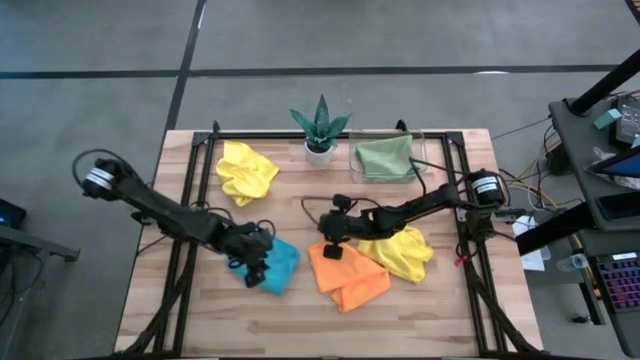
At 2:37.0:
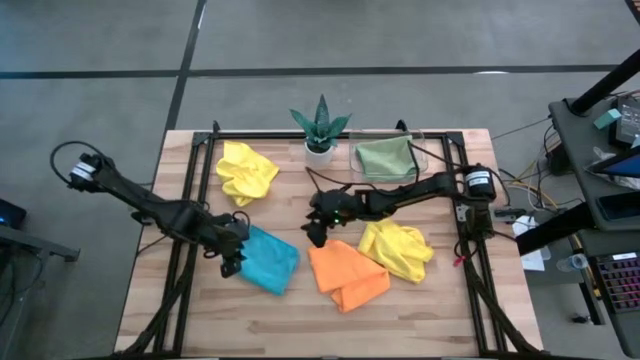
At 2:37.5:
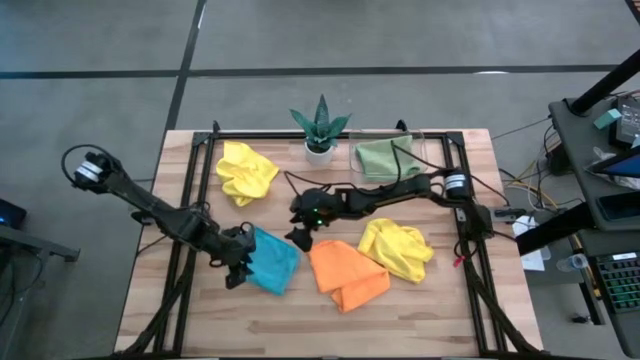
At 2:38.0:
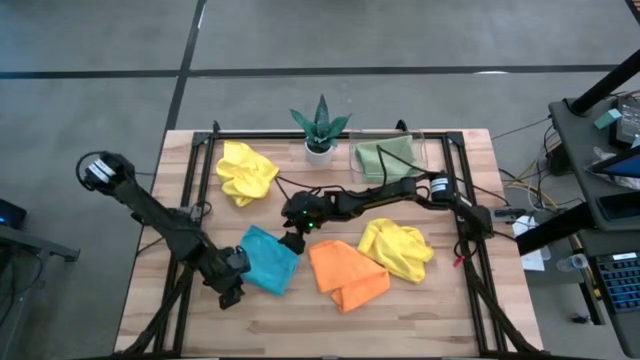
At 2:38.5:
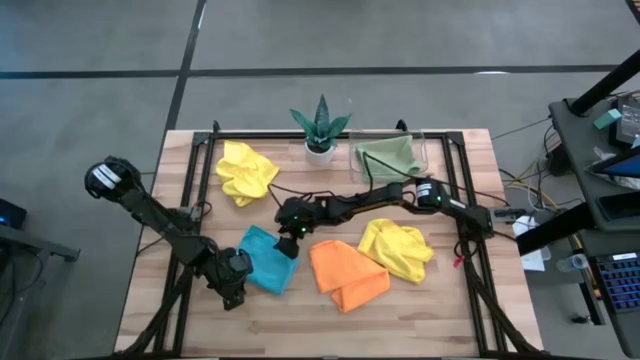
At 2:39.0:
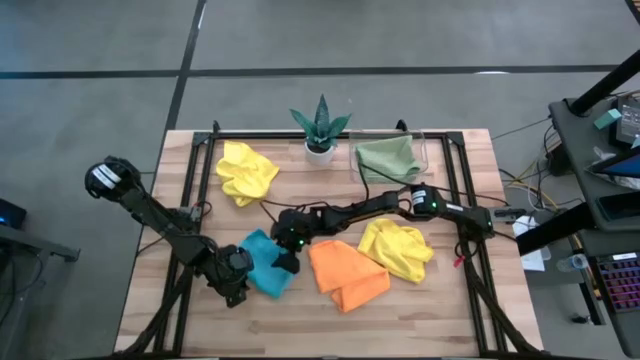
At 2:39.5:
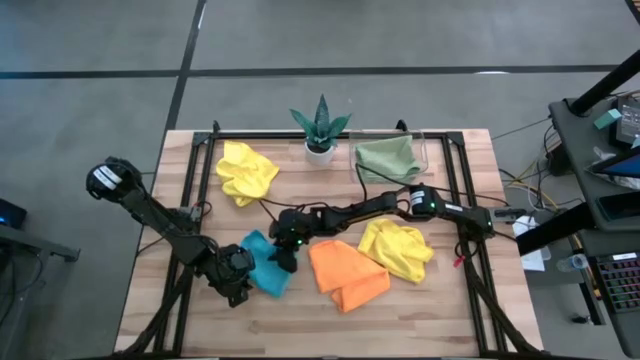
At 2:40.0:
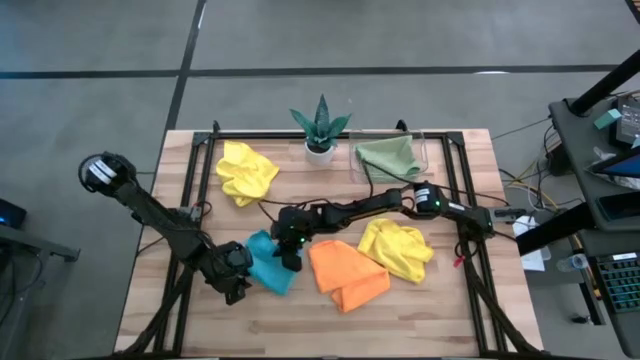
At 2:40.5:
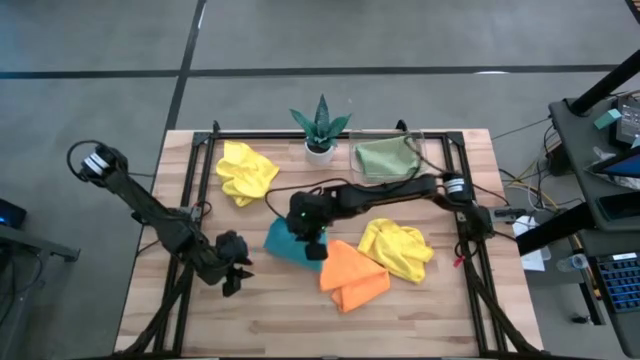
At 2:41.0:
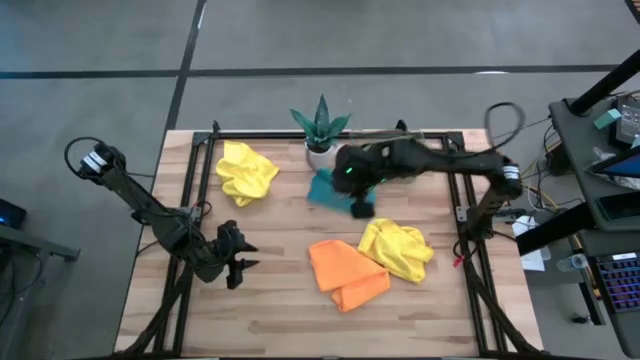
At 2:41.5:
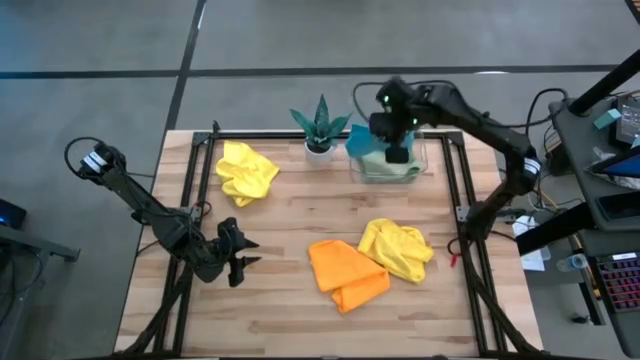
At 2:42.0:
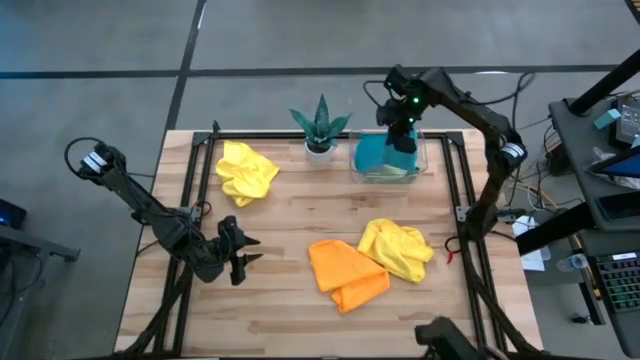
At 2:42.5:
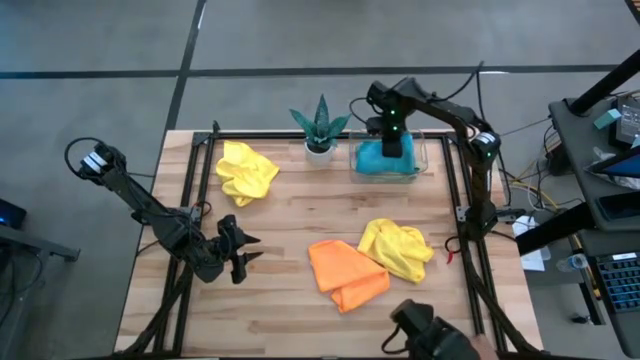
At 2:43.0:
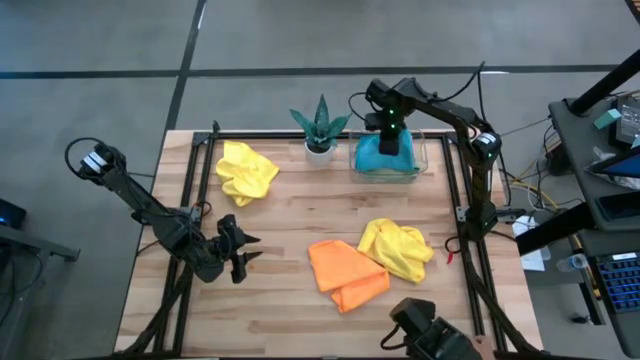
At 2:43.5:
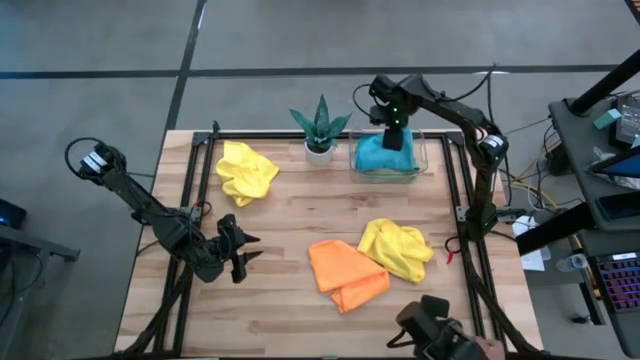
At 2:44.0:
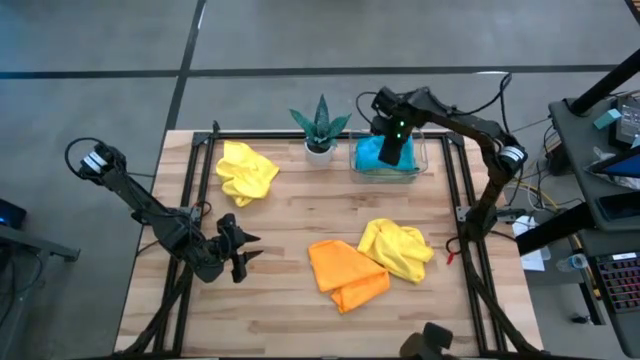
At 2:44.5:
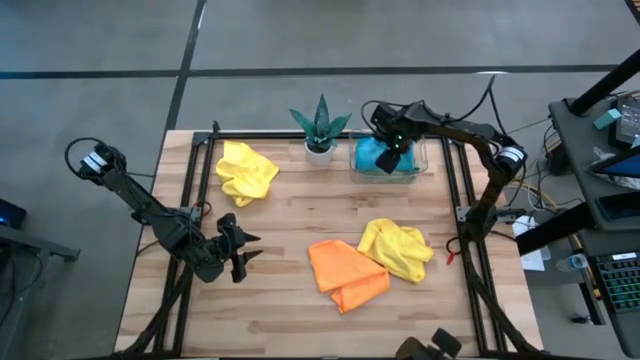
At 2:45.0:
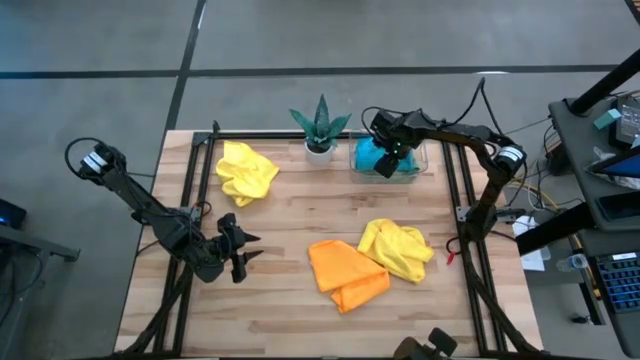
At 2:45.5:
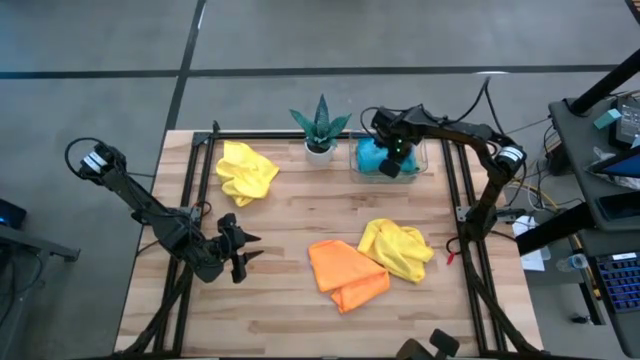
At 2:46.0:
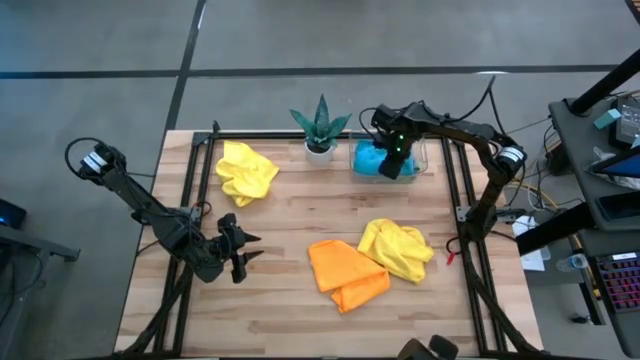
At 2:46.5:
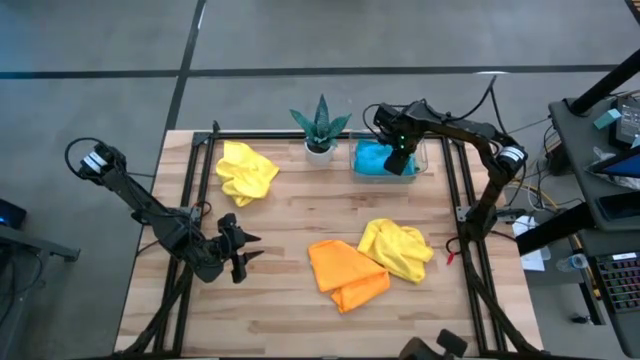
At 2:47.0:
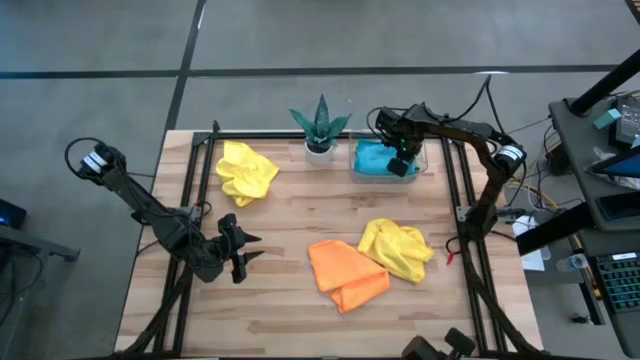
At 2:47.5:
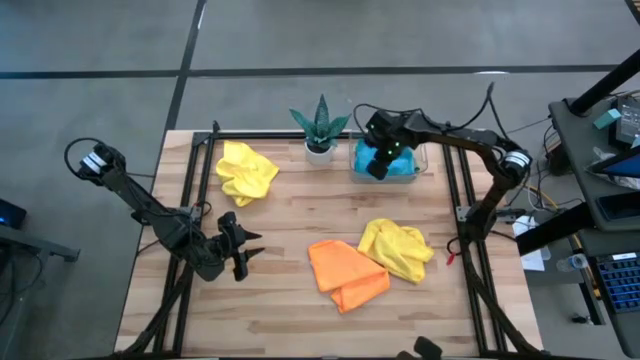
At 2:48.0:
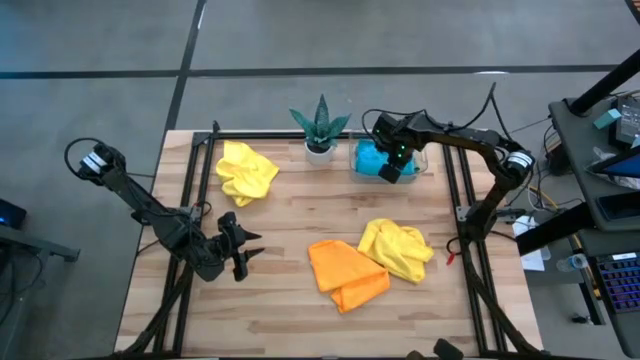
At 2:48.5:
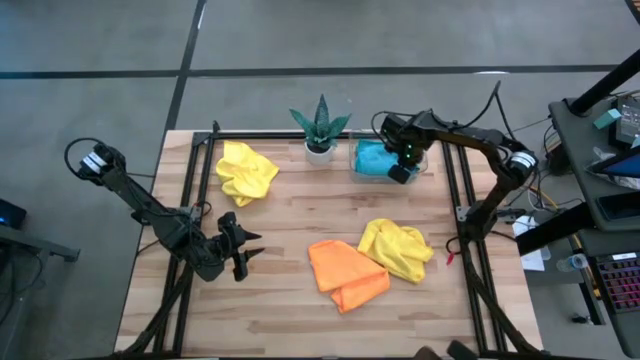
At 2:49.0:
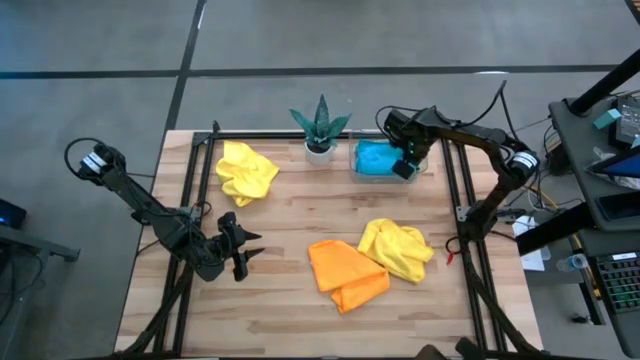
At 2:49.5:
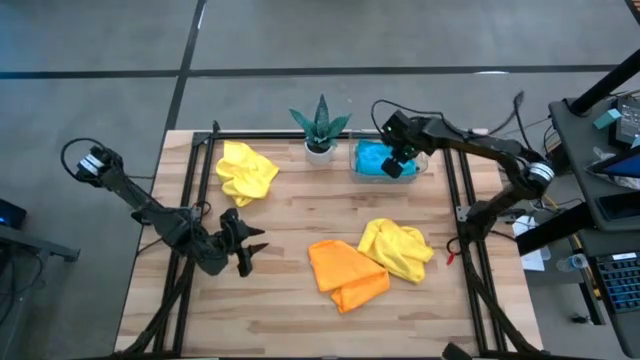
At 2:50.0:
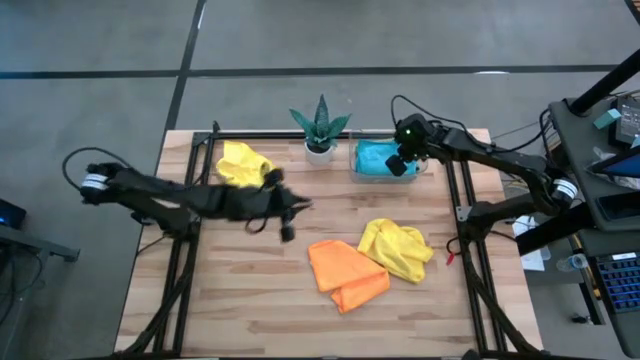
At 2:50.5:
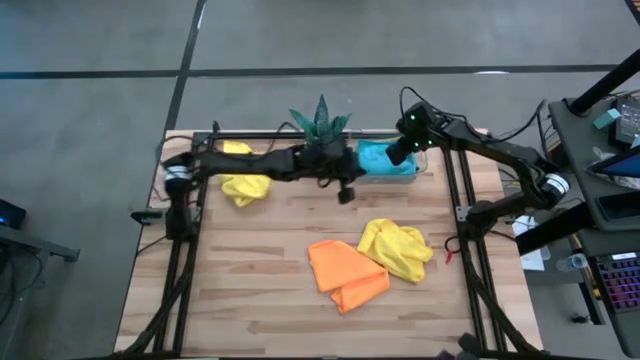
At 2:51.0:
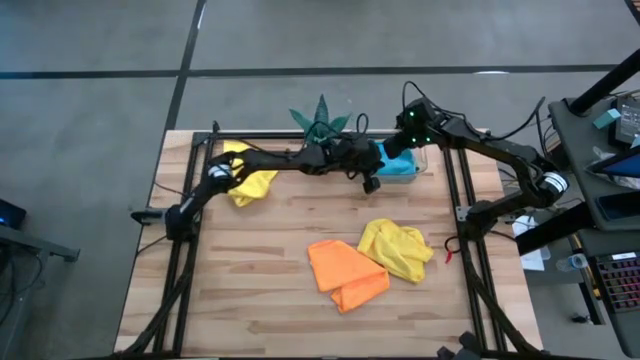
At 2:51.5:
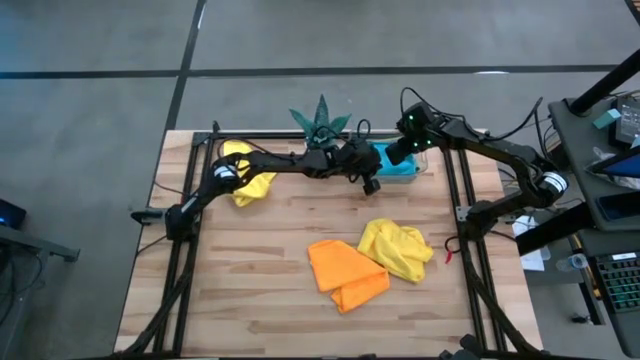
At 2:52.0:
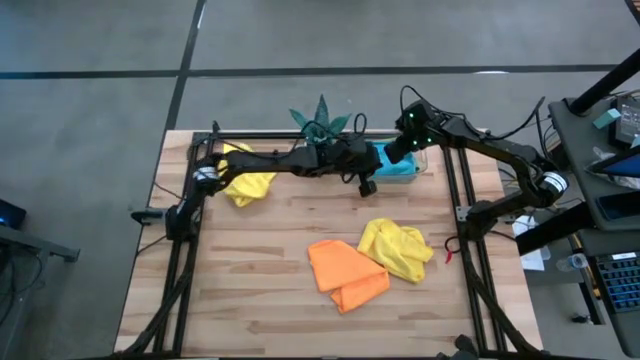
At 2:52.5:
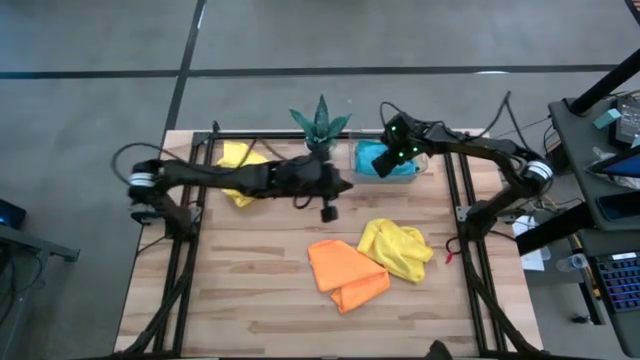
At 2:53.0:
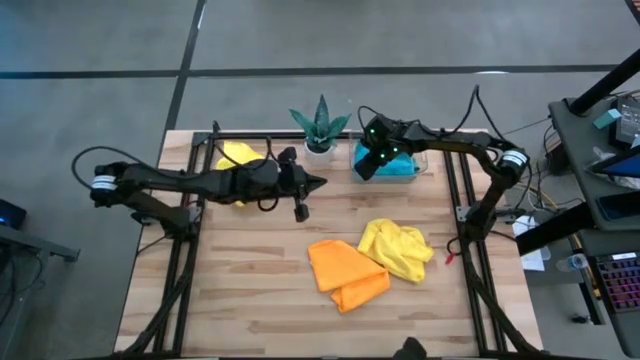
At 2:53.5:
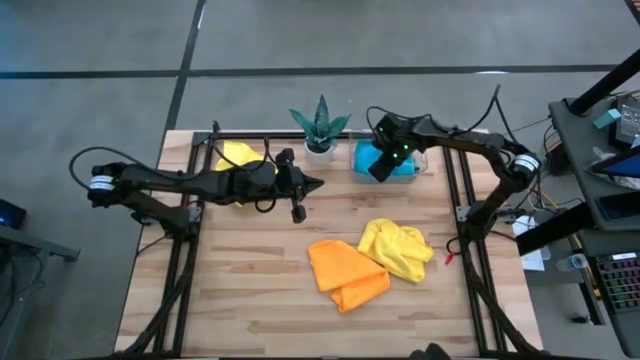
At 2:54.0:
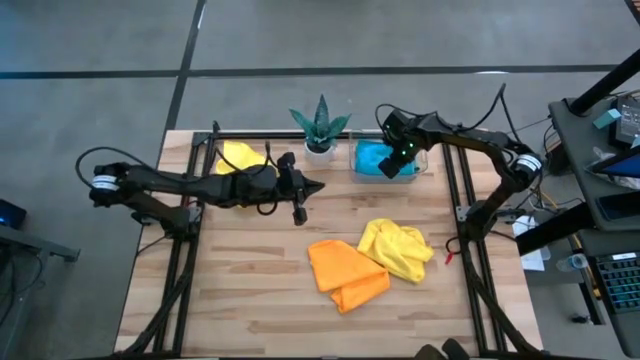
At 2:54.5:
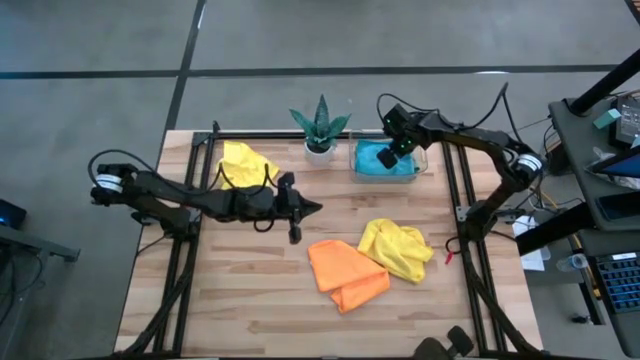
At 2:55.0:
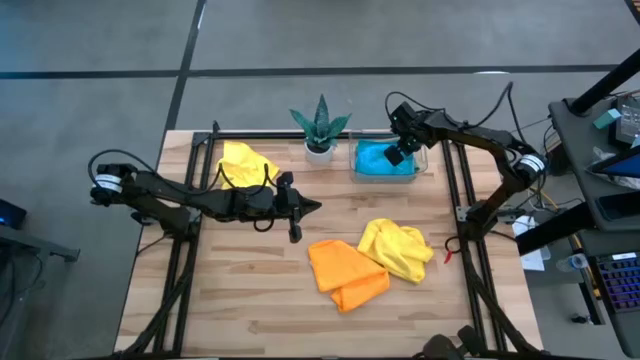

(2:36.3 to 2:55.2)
Task: Fold microfiber towels
Put the blue microfiber towel into the transparent bin
